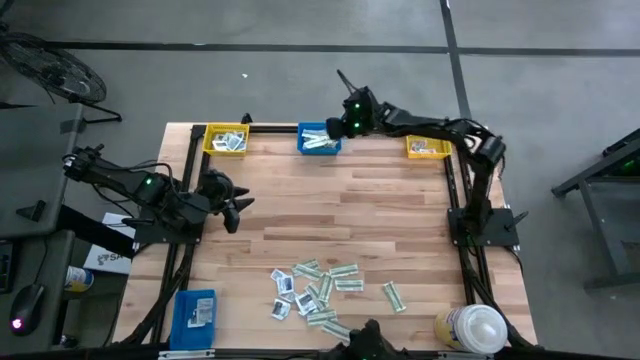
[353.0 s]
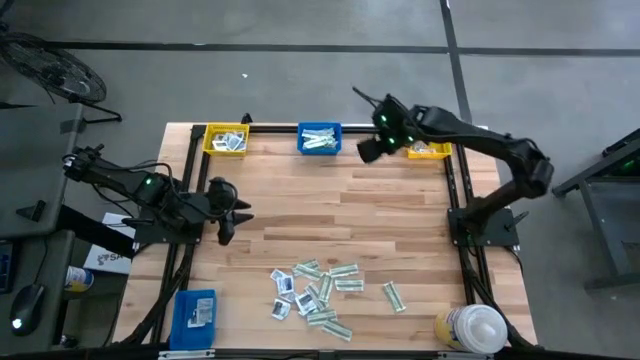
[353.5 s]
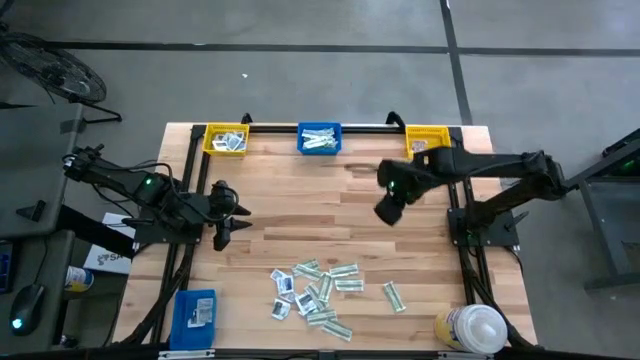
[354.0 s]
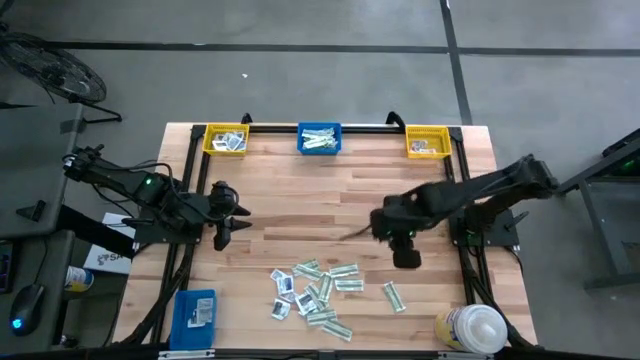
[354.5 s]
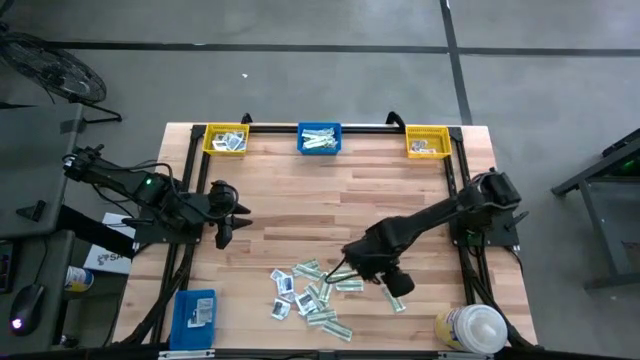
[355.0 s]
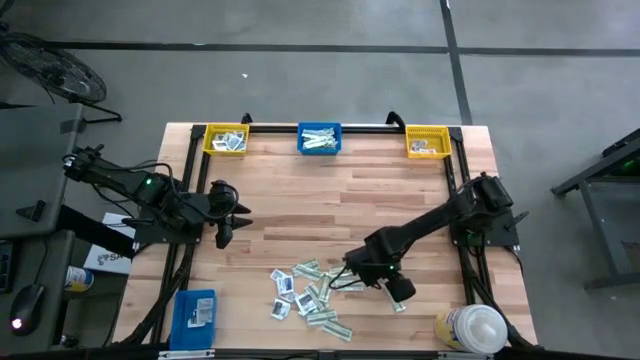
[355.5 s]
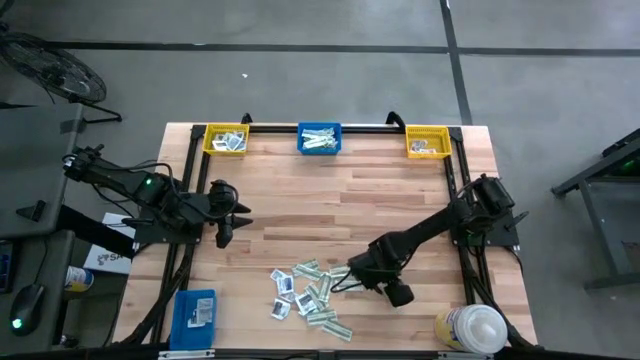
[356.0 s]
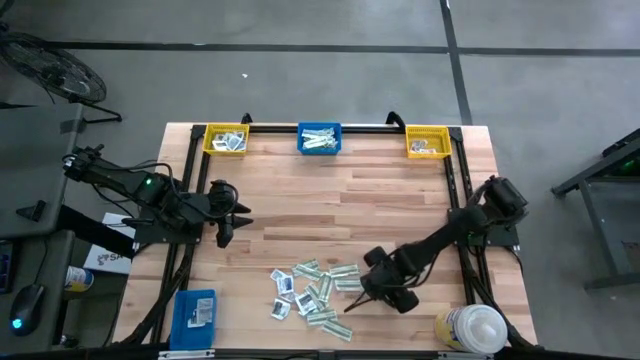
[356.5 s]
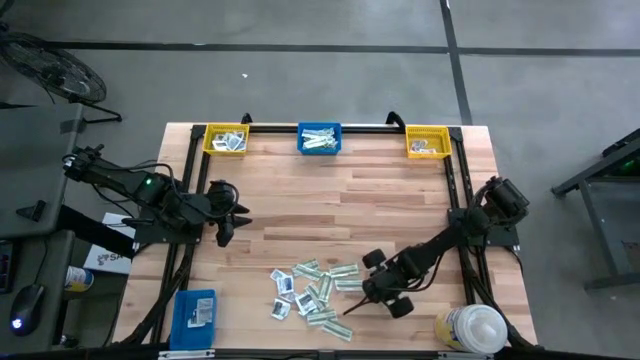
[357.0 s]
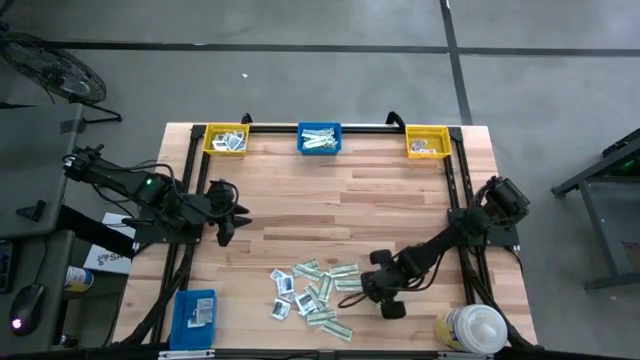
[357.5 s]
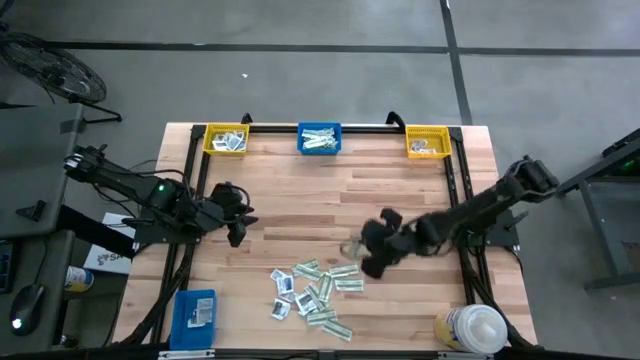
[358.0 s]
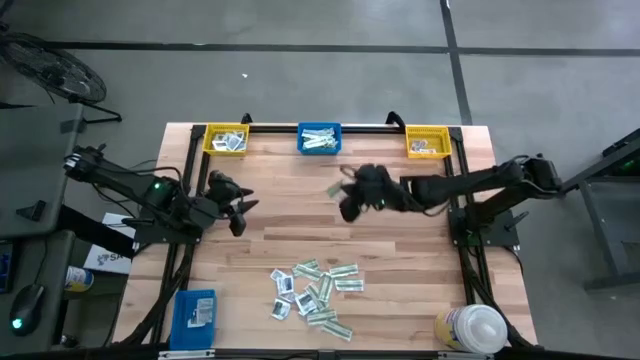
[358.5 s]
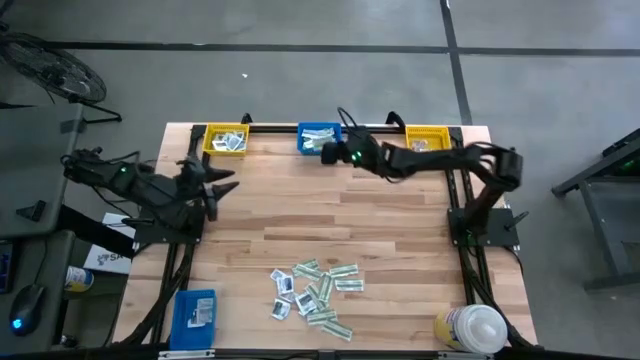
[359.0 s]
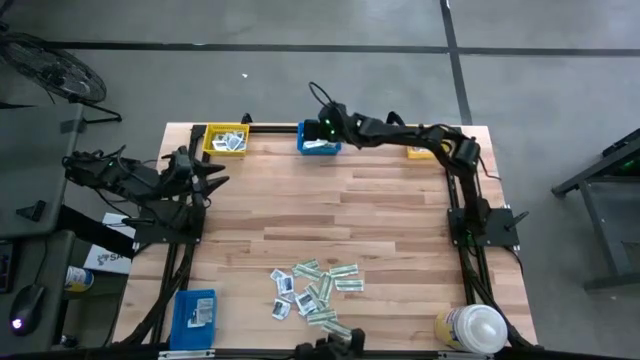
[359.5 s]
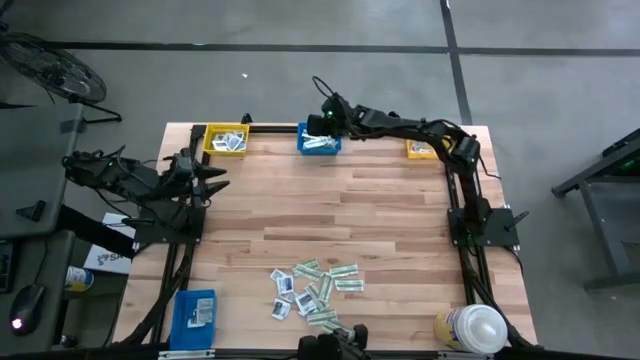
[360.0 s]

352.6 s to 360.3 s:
Task: Pick & Place First Aid Supplies
Put the green bandage pack into the top blue bin

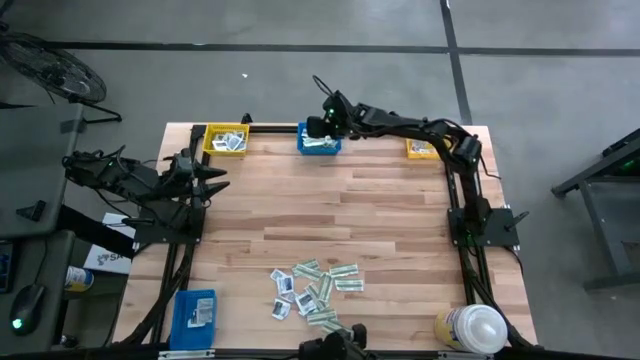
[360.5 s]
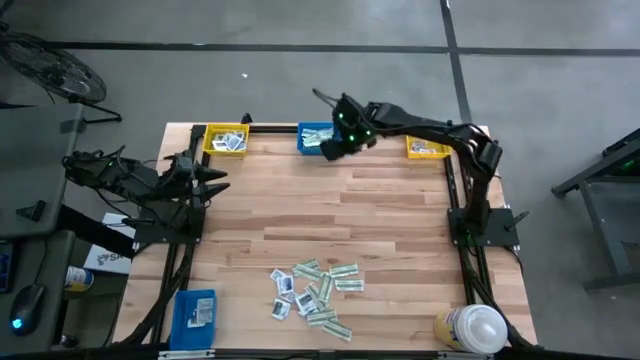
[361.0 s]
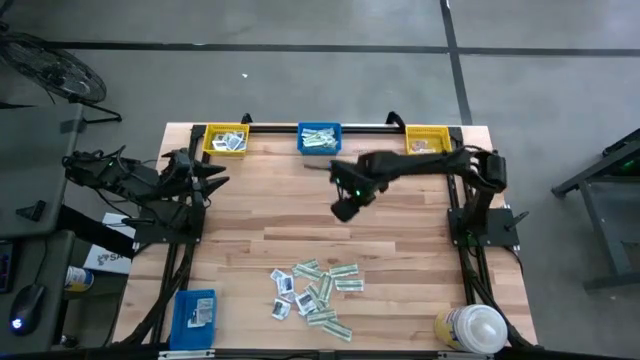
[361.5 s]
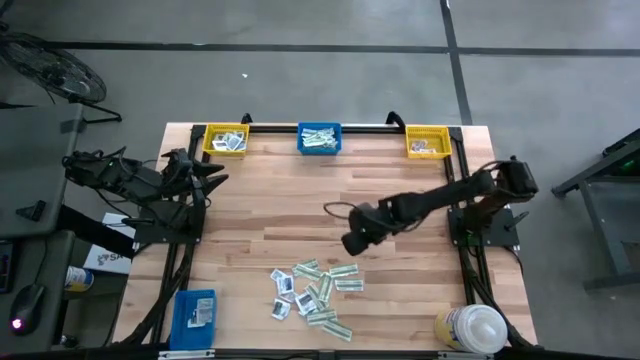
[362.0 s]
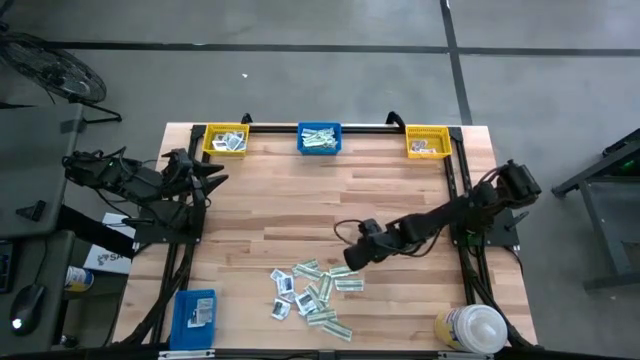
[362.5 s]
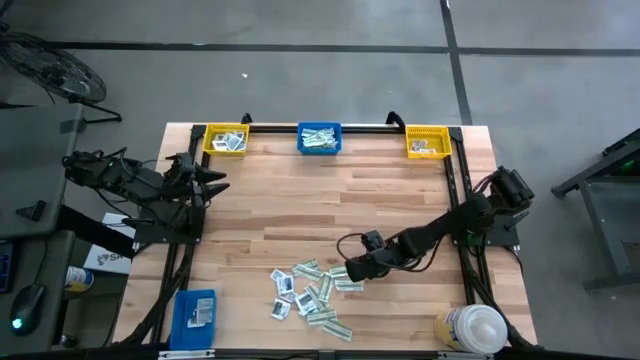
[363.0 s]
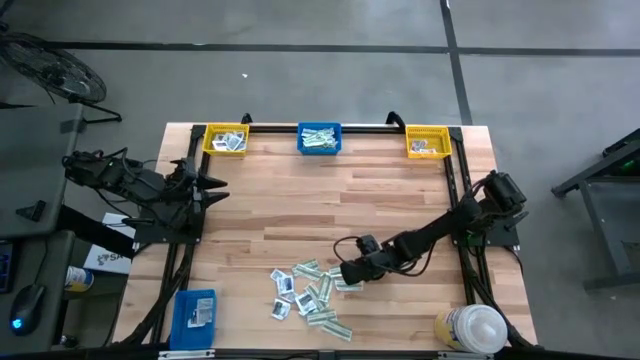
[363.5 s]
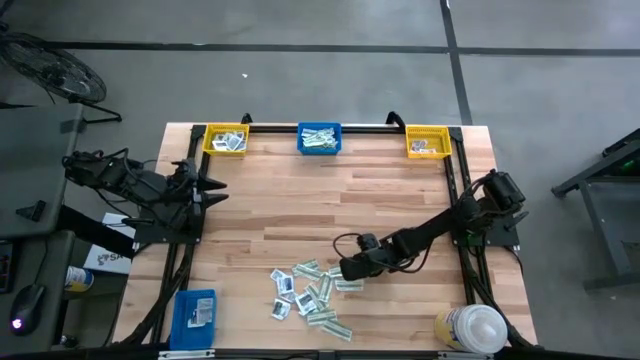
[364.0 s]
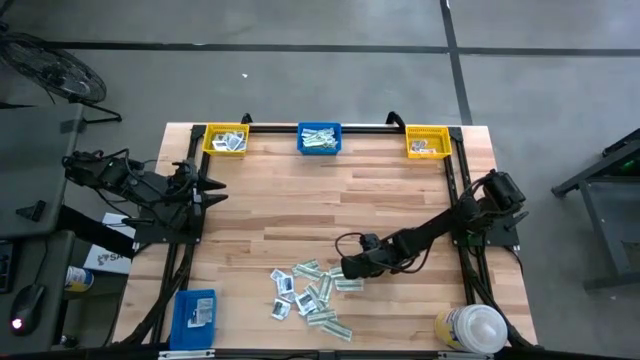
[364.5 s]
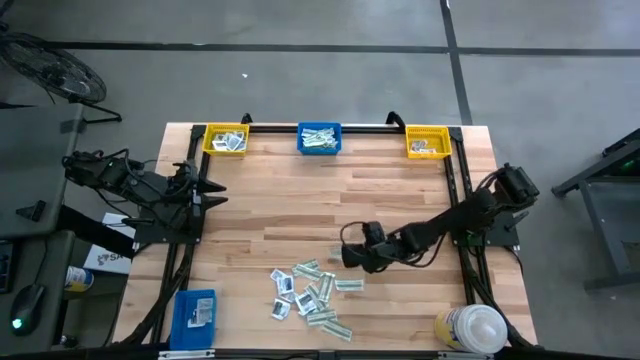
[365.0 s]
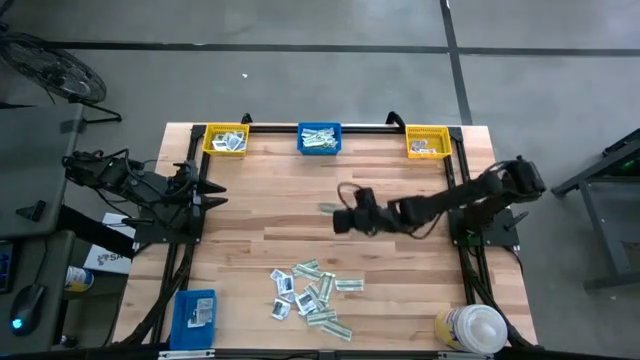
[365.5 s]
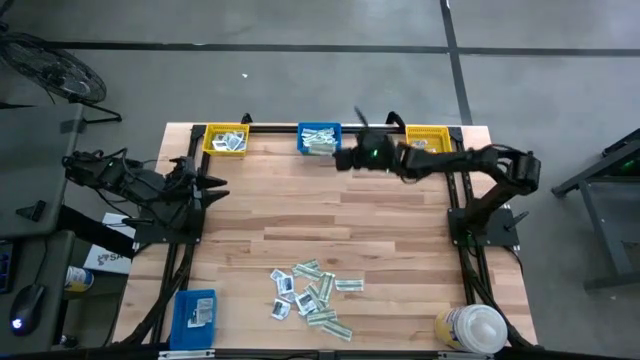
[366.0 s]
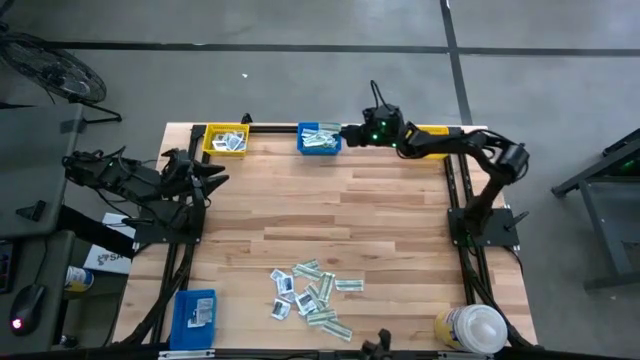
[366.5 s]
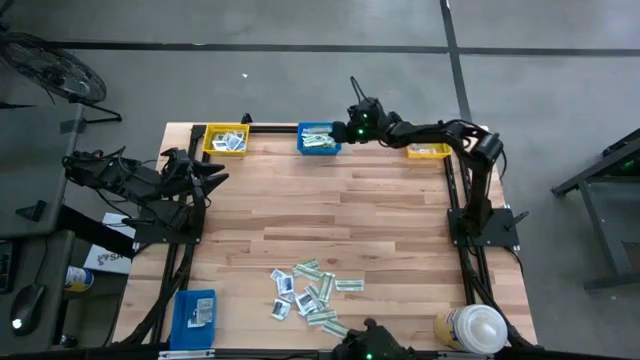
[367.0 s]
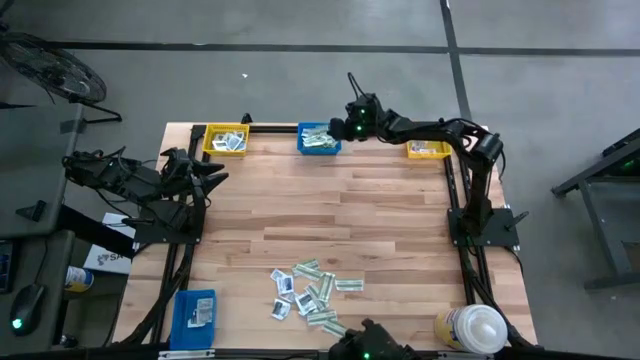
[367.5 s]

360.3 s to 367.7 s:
Put the green bandage pack into the top blue bin

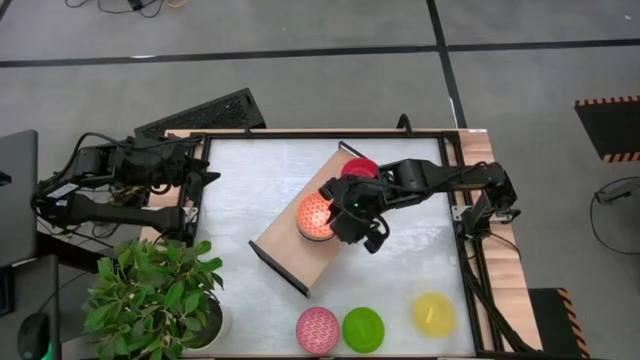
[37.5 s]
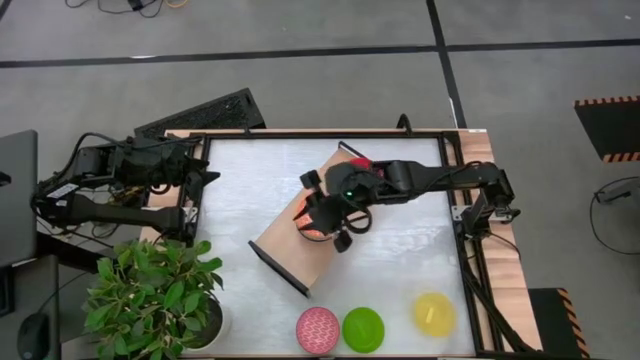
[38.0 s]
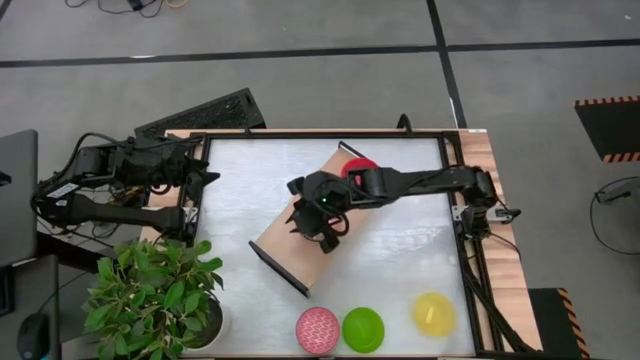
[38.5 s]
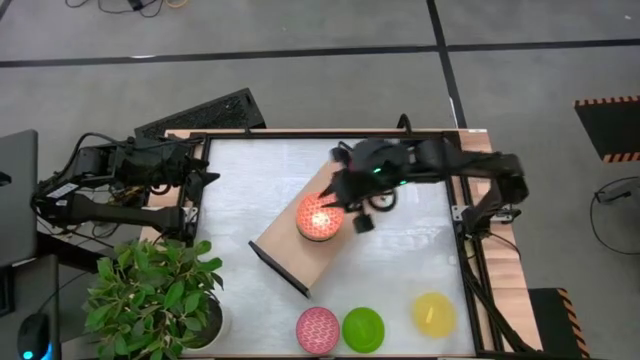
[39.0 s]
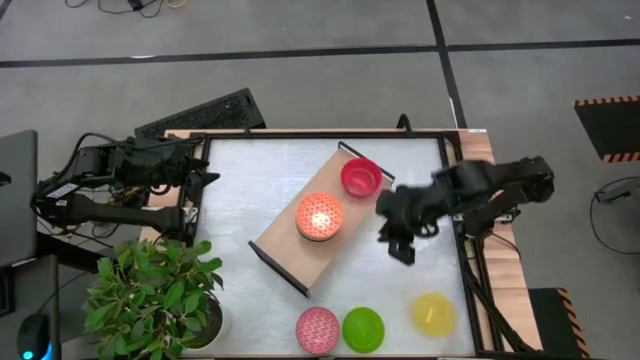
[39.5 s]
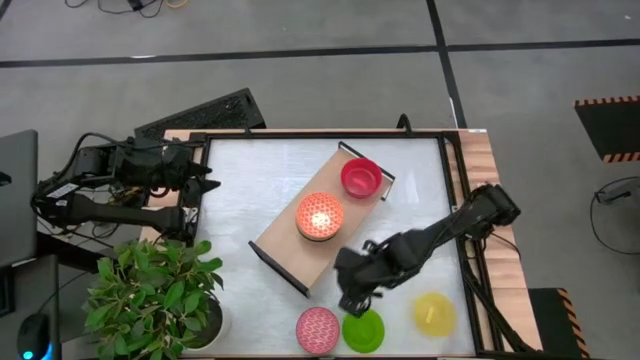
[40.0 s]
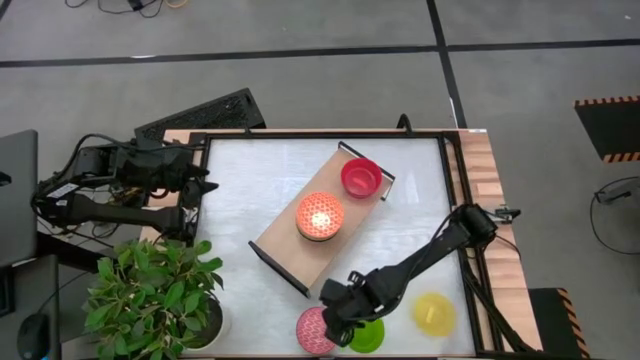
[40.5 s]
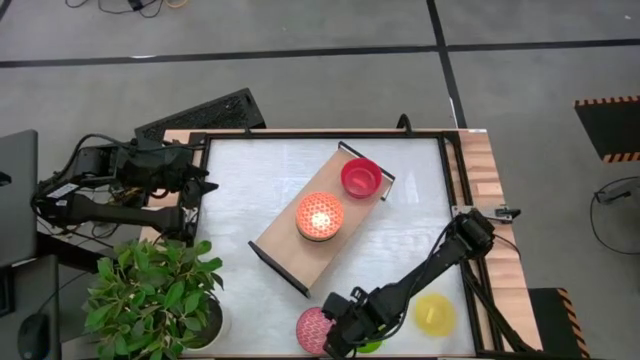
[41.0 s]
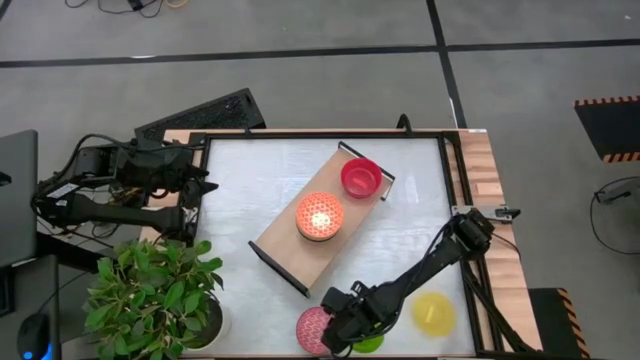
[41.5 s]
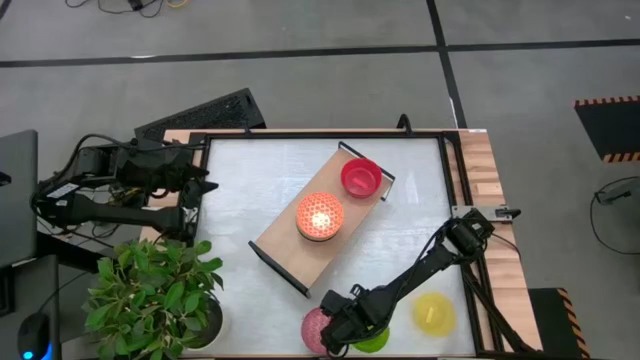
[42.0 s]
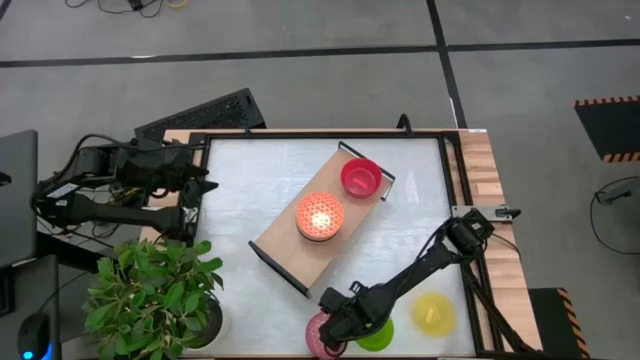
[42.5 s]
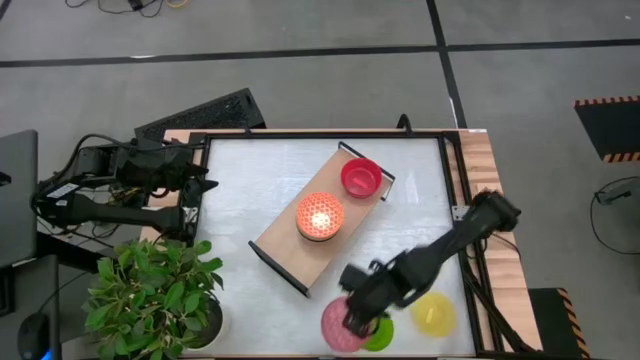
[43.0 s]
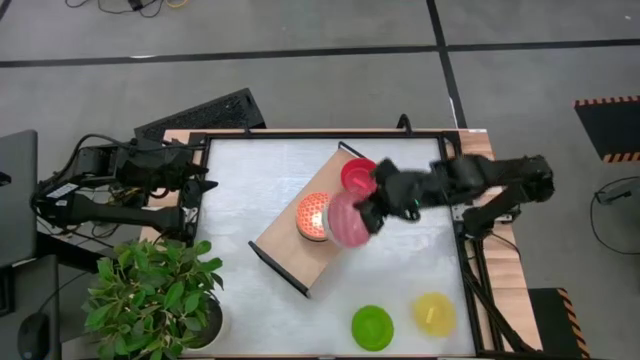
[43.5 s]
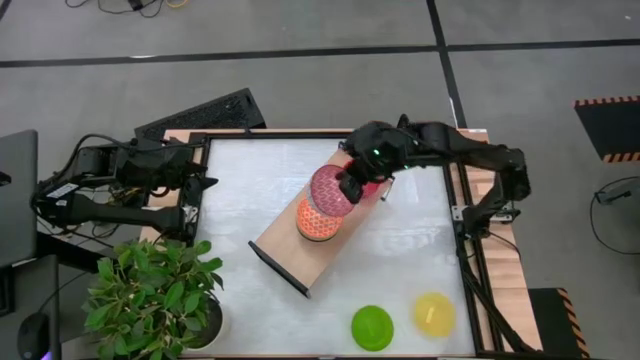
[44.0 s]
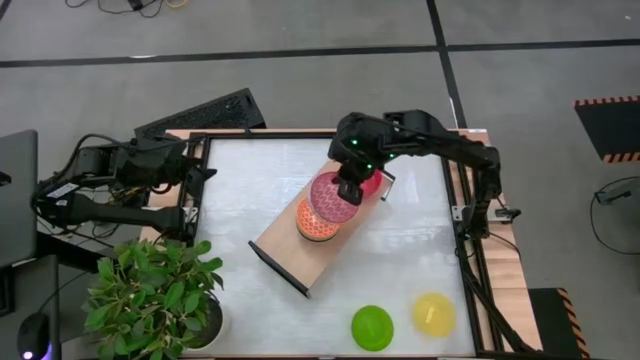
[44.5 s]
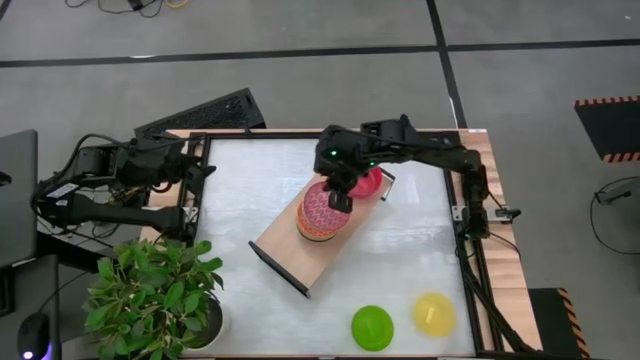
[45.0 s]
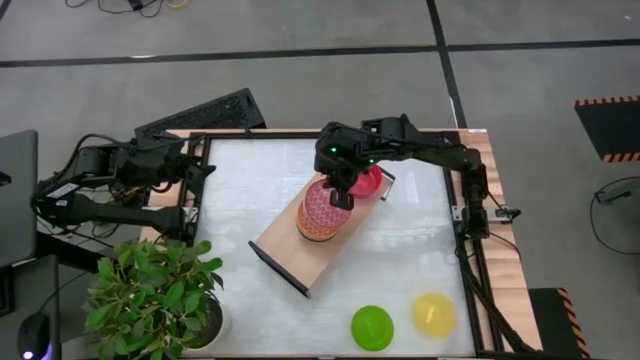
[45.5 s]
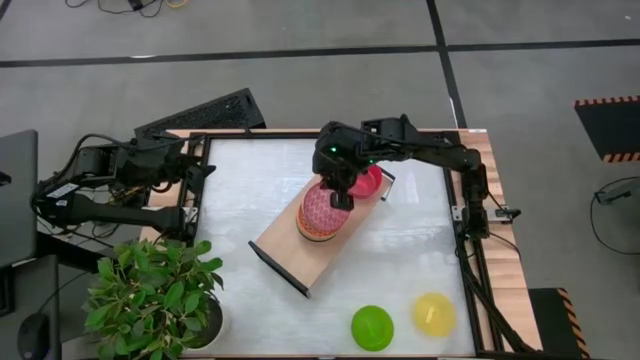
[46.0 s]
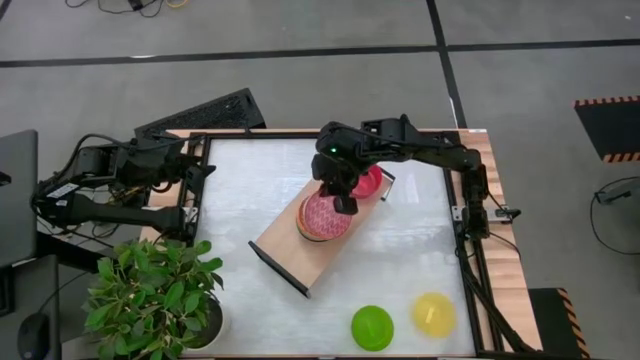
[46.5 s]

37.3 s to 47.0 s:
Task: Place and stack bowls onto a shelf
Stack the red patterned bowl on top of the orange patterned bowl on the shelf
